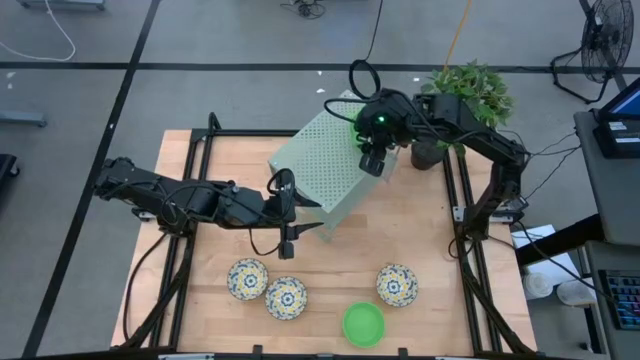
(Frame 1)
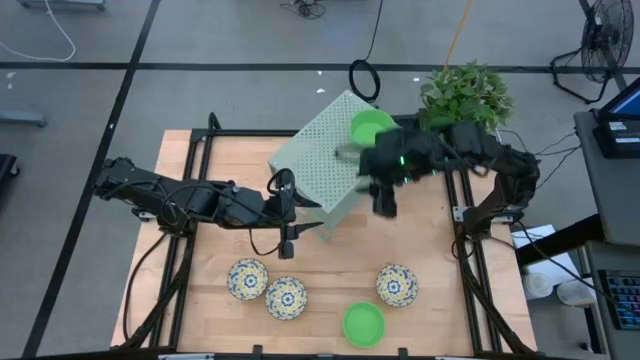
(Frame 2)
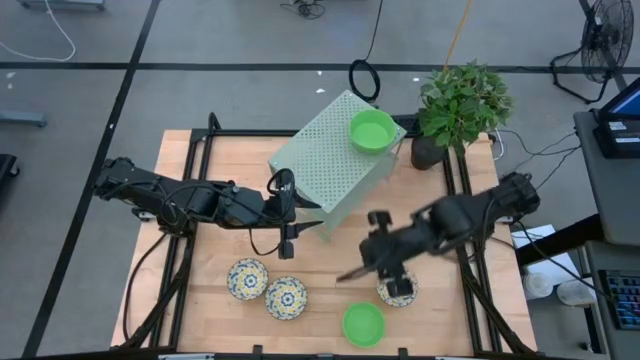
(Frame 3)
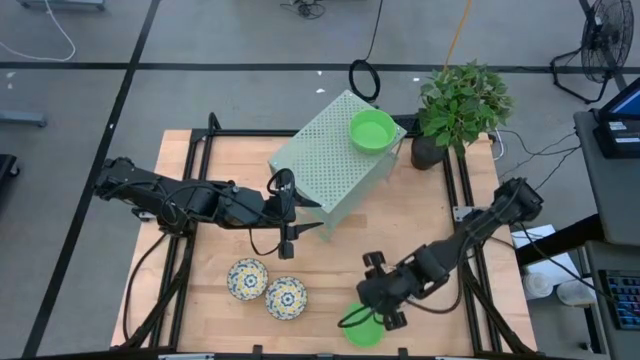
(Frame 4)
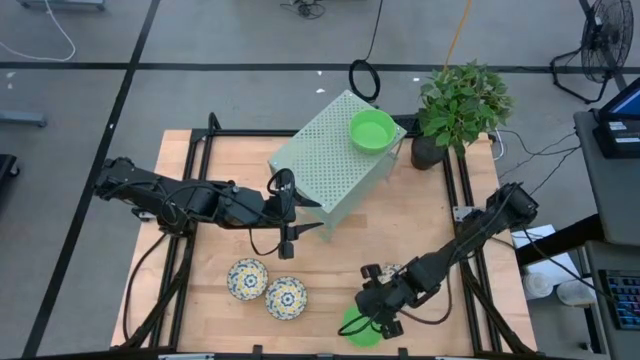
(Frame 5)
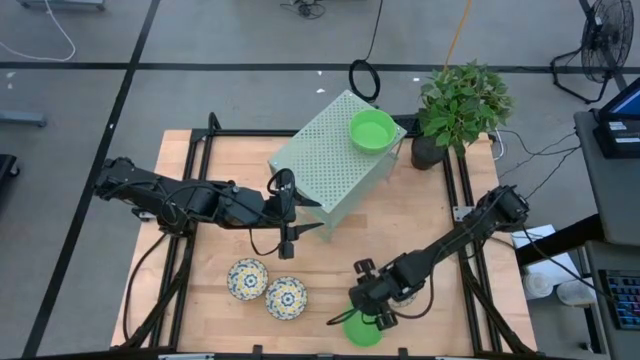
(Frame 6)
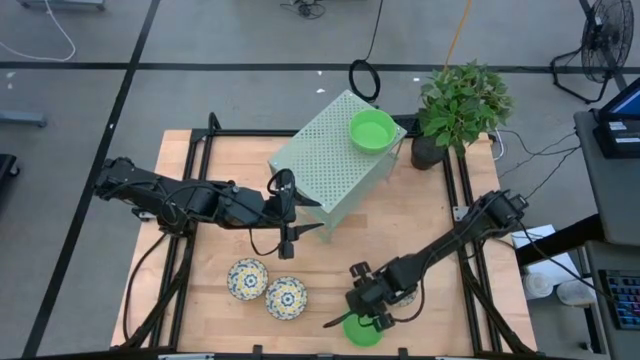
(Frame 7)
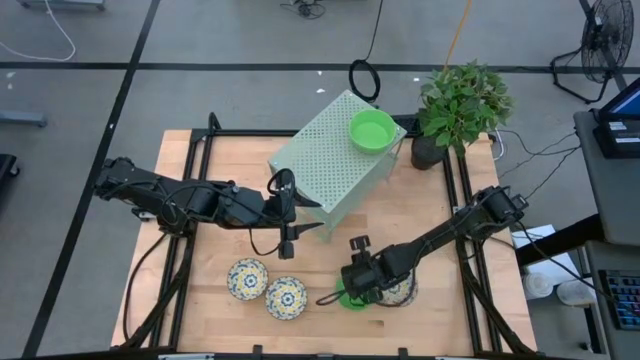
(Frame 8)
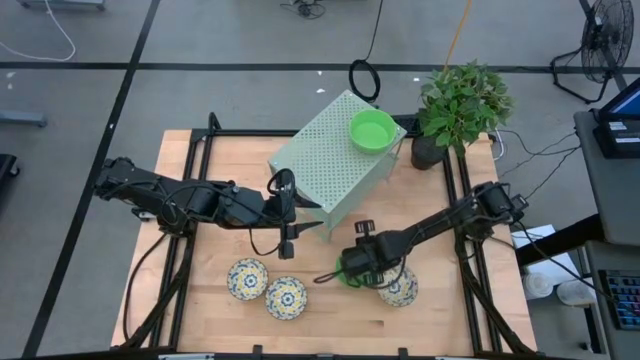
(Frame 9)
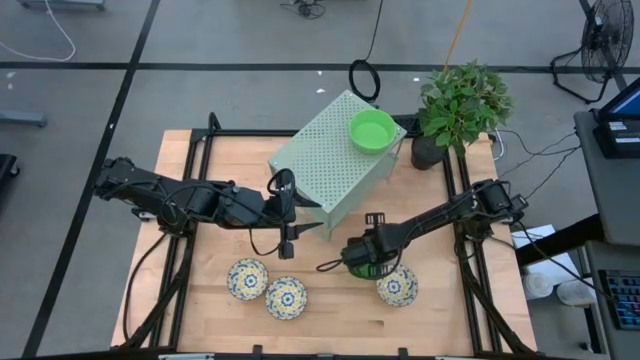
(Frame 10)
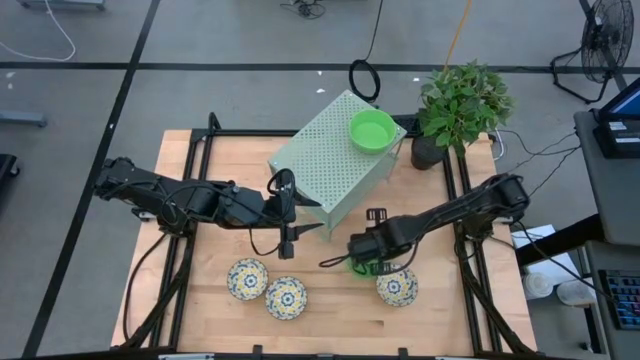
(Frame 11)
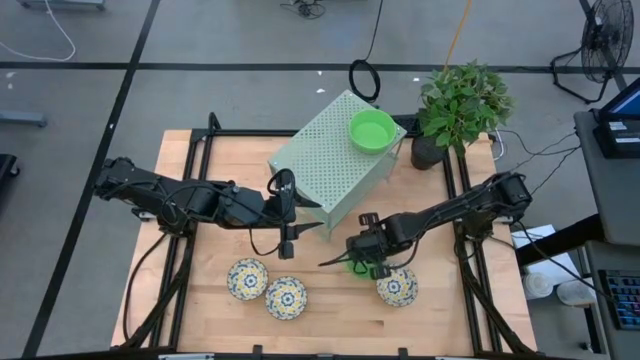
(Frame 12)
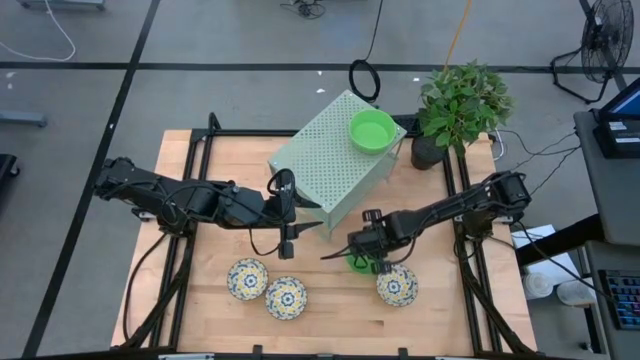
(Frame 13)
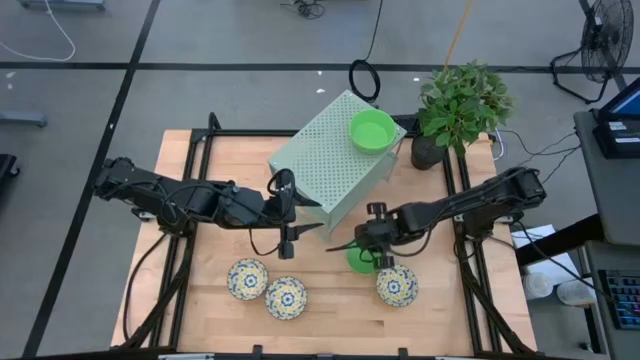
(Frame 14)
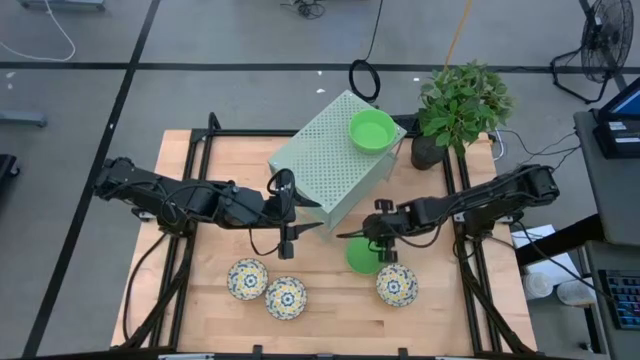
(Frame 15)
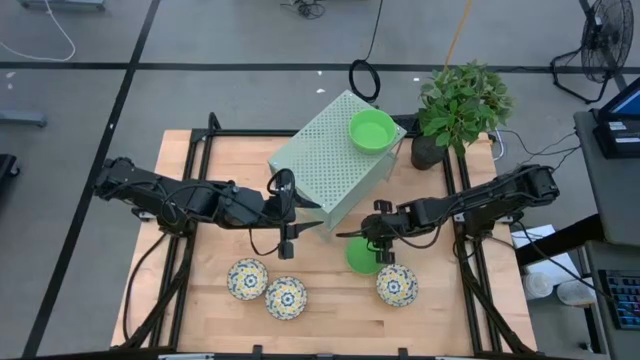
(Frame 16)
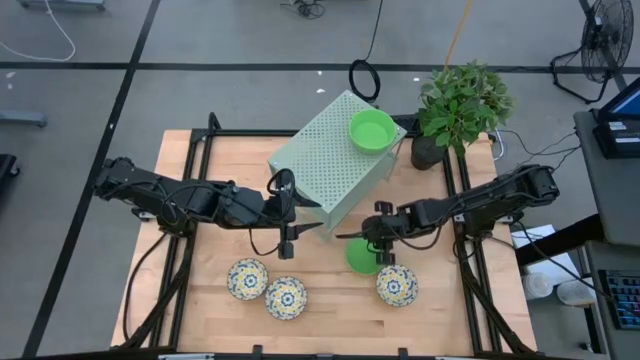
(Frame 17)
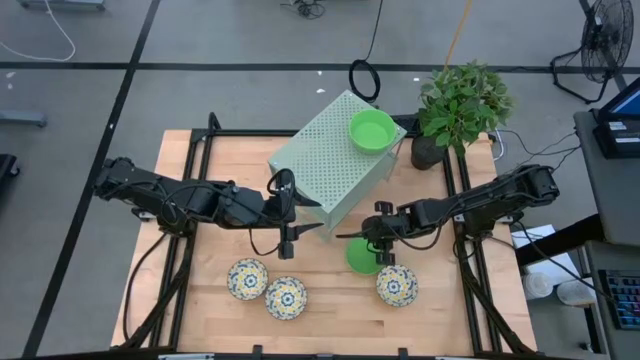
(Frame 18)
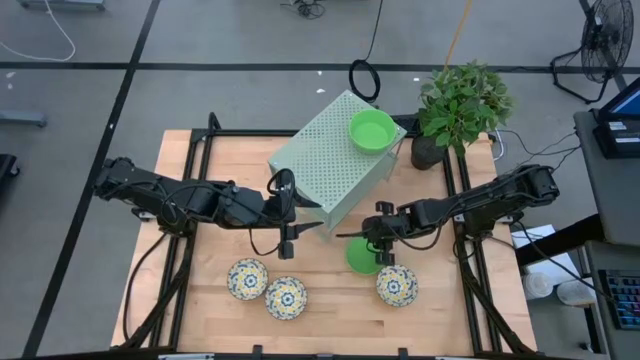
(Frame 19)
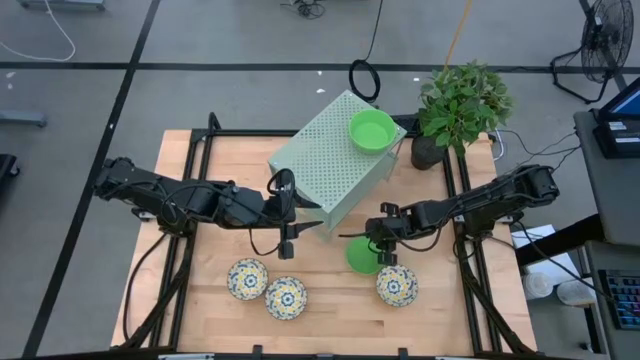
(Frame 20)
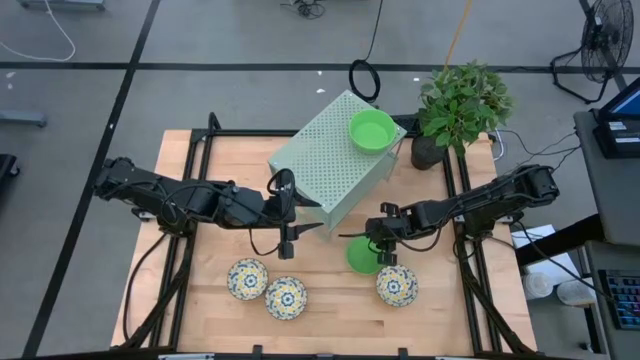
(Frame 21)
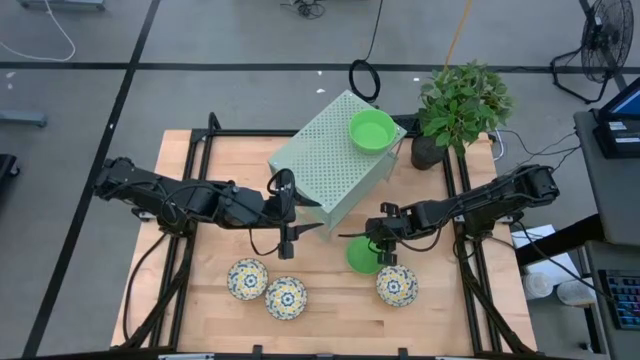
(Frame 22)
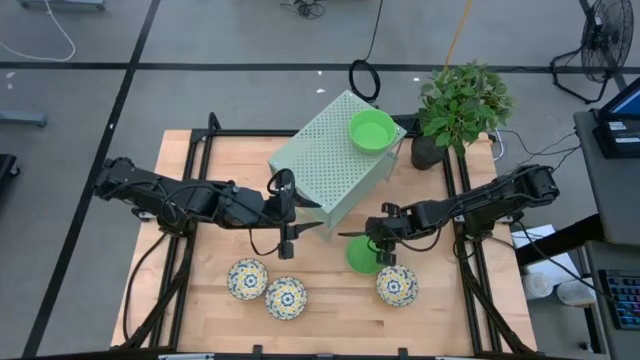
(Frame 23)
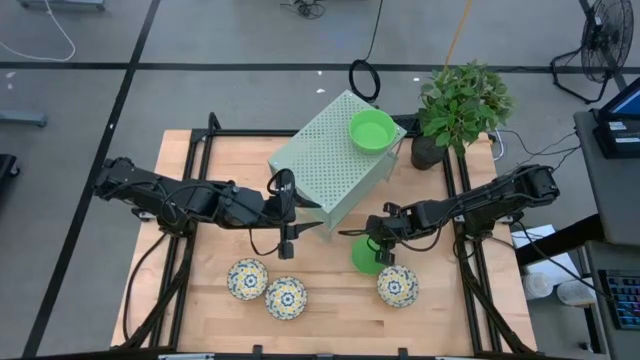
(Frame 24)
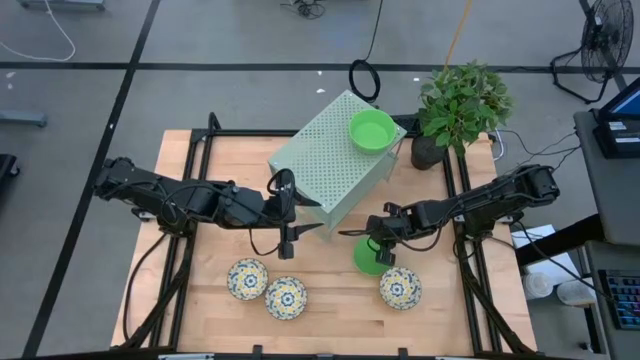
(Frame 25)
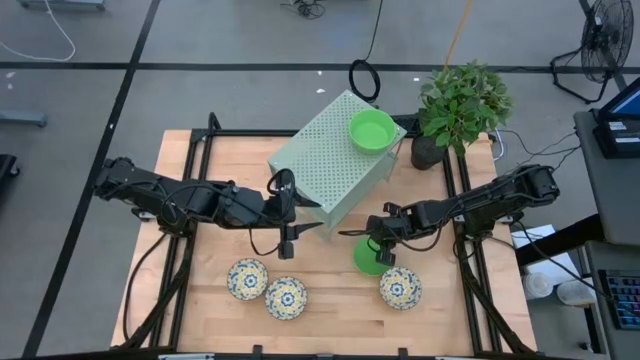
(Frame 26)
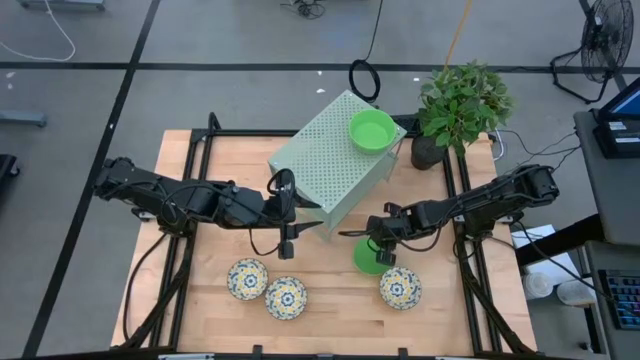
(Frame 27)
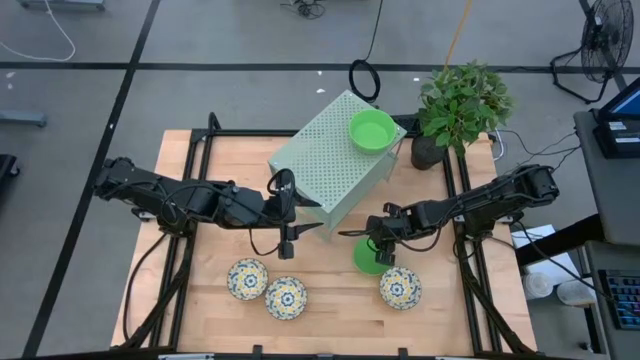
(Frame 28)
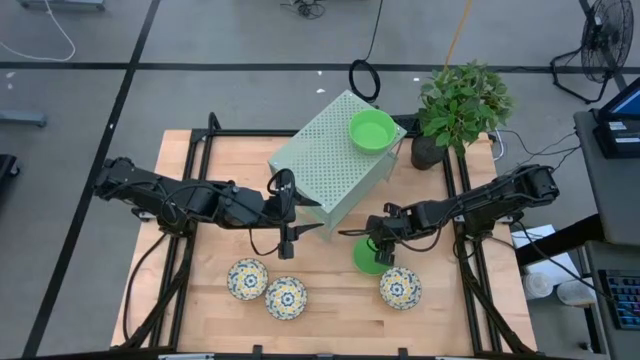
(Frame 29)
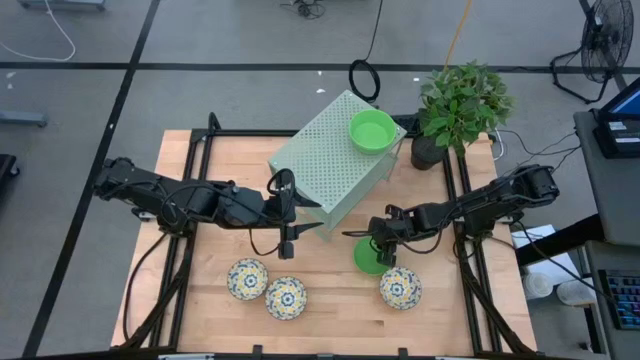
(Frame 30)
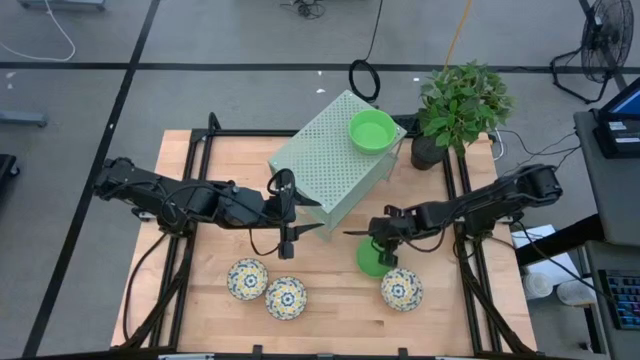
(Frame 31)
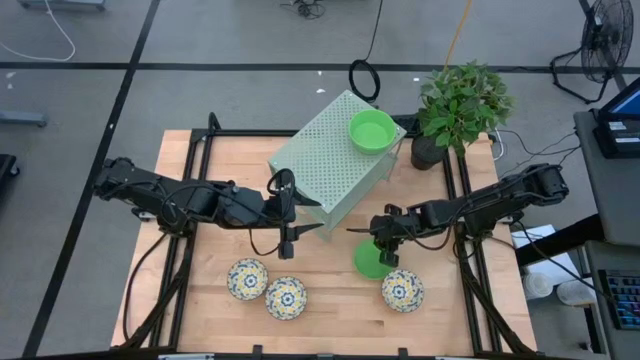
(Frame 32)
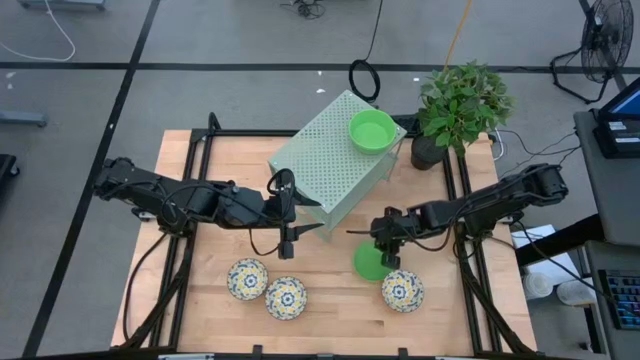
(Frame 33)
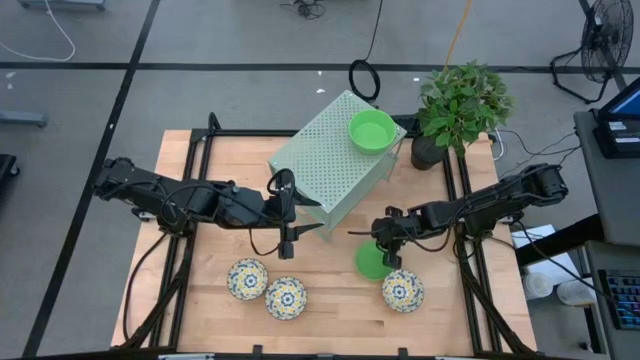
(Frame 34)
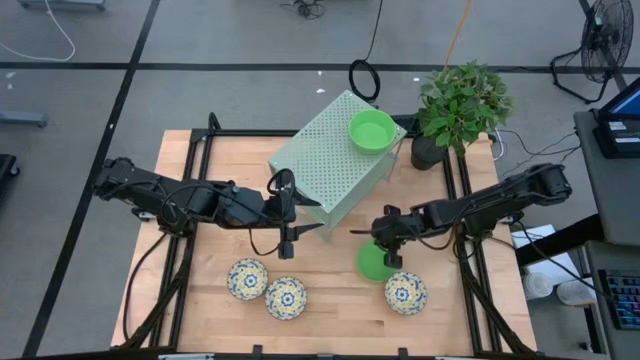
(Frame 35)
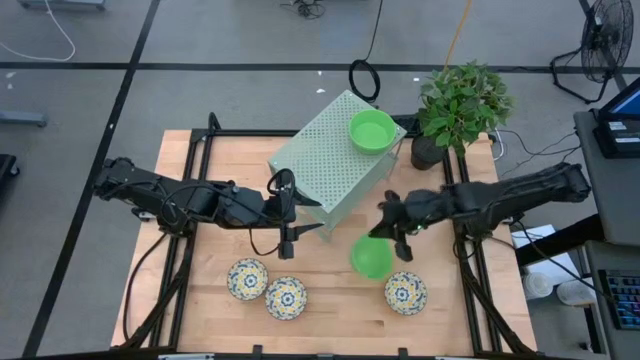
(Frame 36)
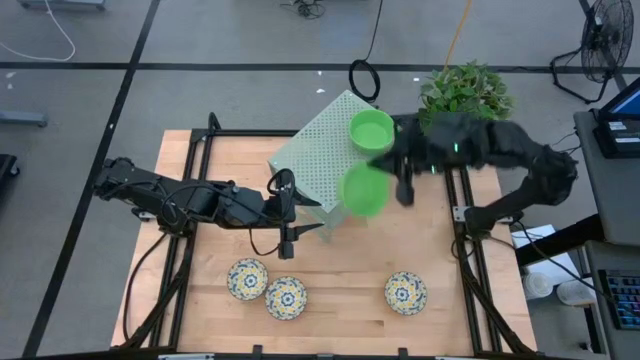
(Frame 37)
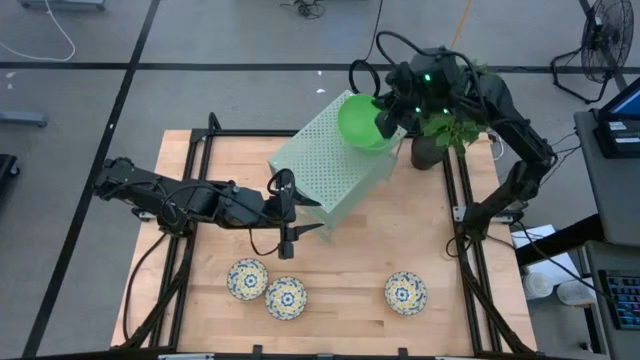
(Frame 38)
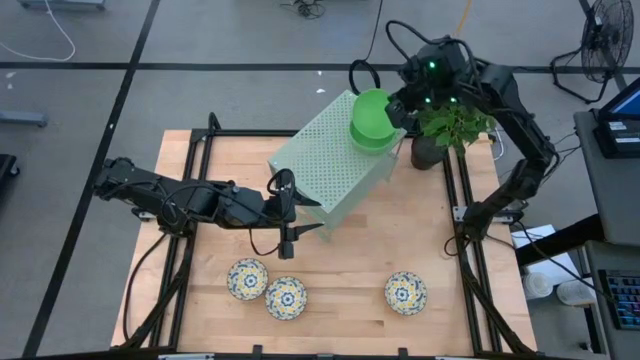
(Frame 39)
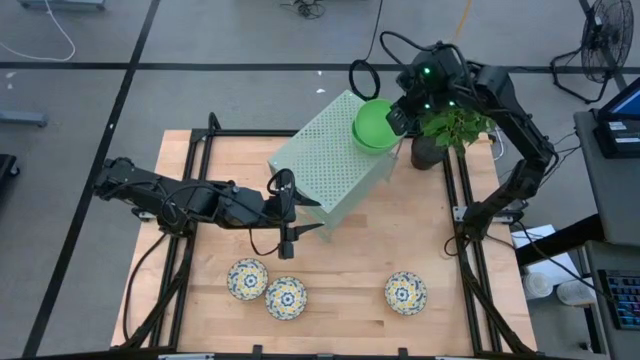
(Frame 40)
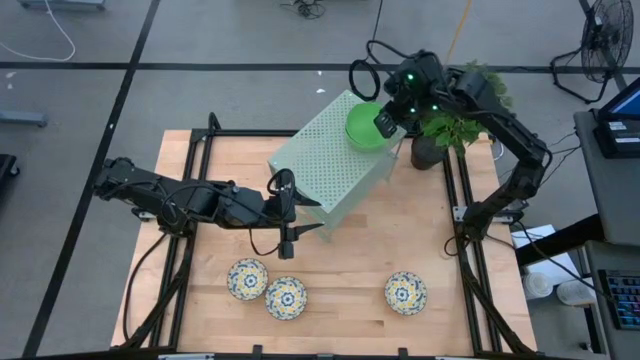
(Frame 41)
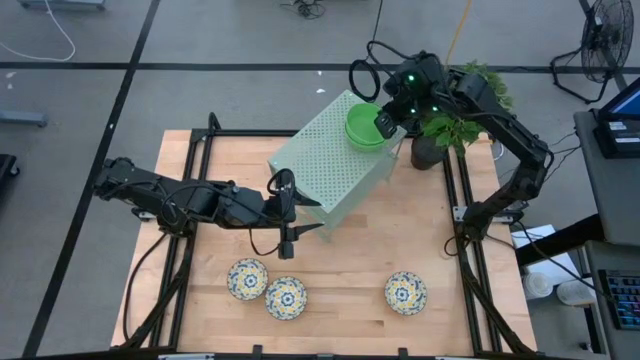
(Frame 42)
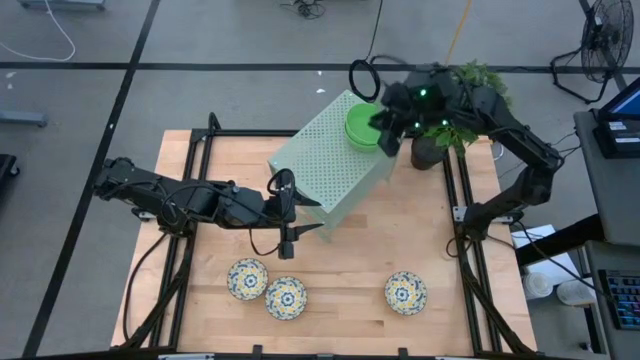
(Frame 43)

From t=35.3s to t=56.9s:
Task: Pick & Place Mini bowls
Stack the green bowl on the green bowls on the shelf
